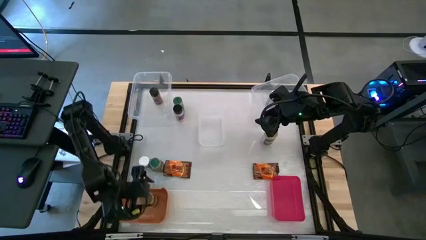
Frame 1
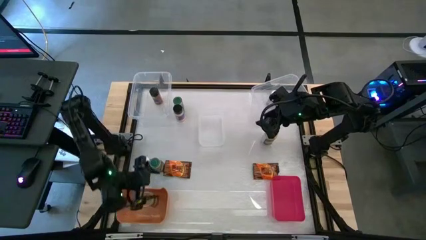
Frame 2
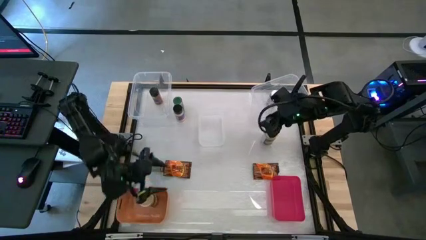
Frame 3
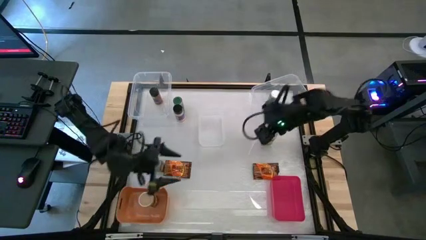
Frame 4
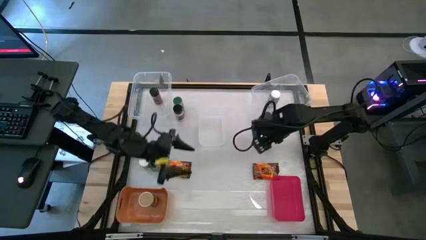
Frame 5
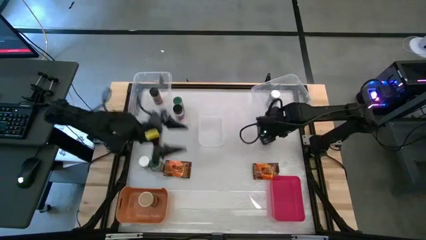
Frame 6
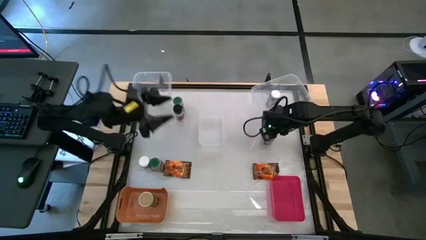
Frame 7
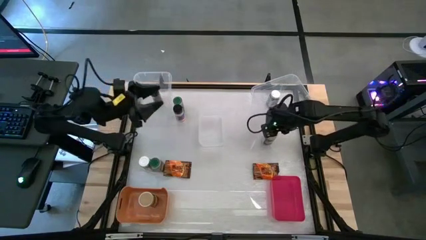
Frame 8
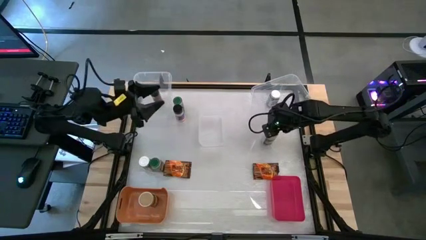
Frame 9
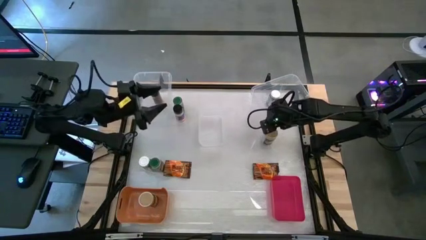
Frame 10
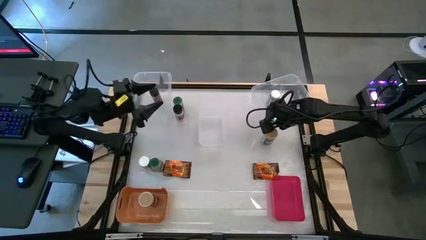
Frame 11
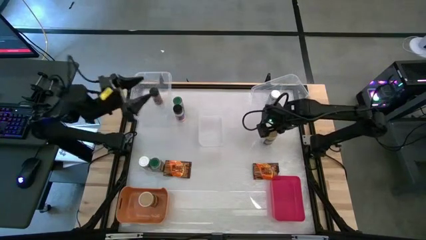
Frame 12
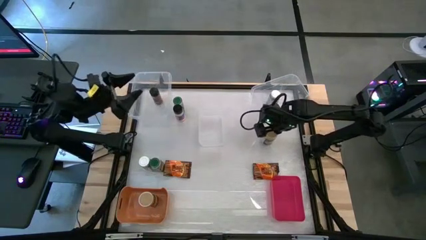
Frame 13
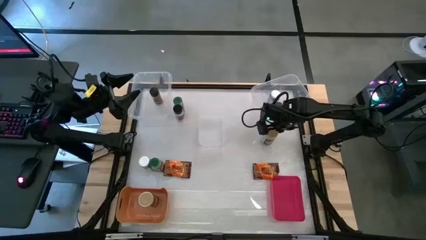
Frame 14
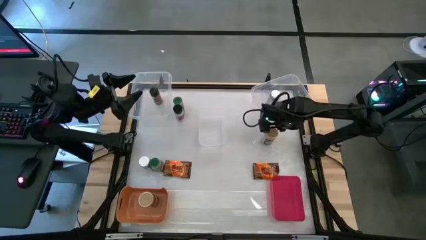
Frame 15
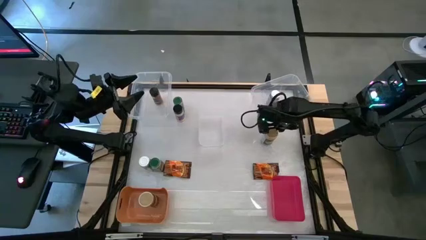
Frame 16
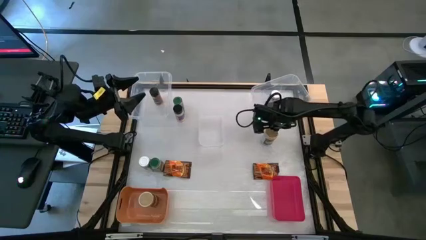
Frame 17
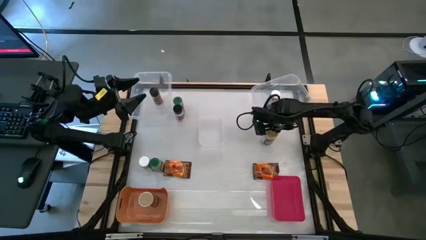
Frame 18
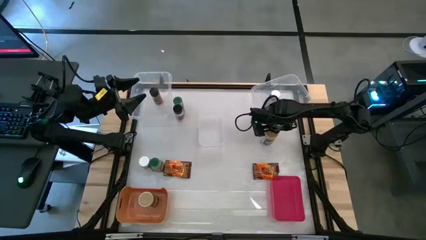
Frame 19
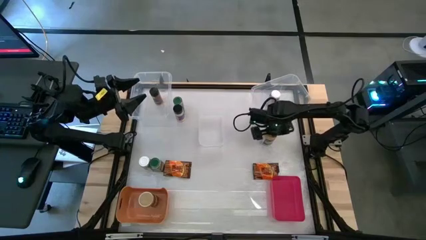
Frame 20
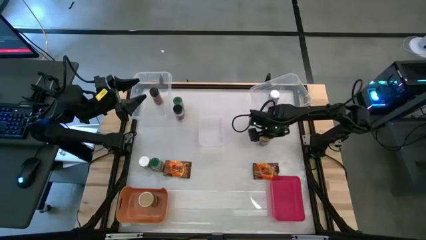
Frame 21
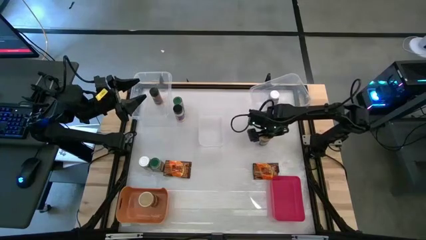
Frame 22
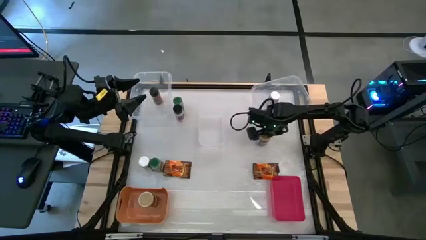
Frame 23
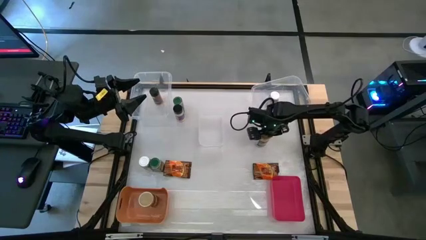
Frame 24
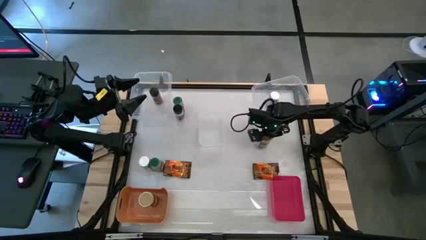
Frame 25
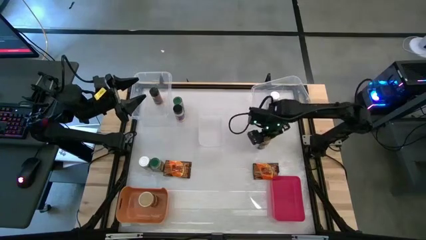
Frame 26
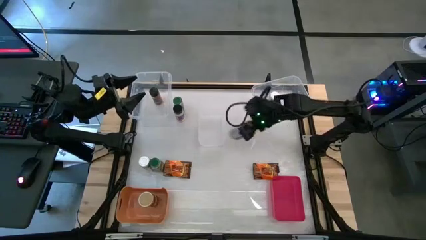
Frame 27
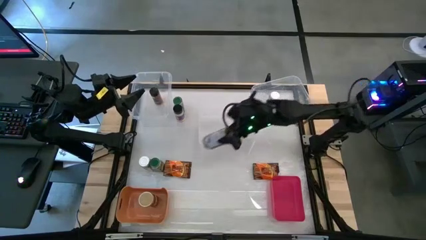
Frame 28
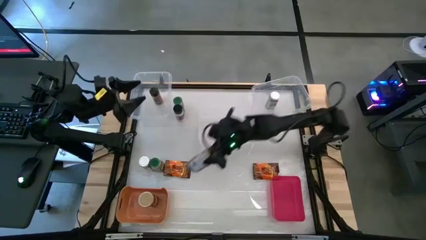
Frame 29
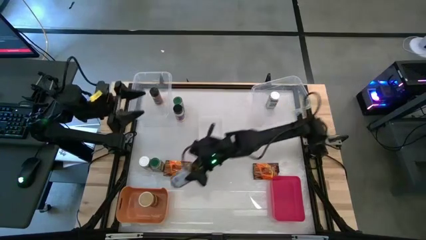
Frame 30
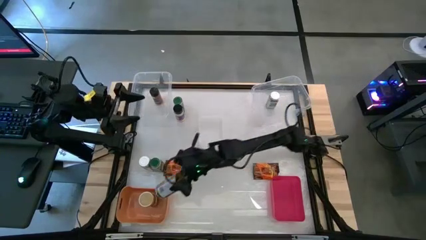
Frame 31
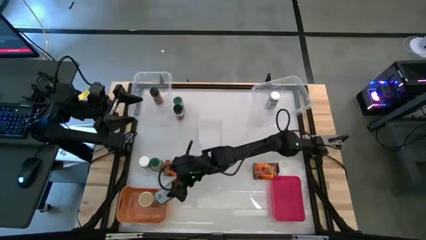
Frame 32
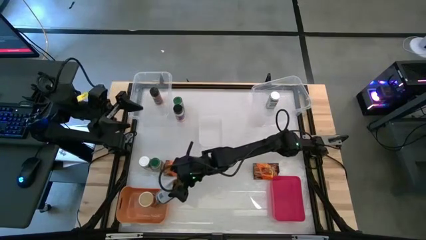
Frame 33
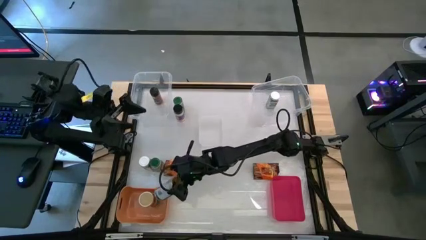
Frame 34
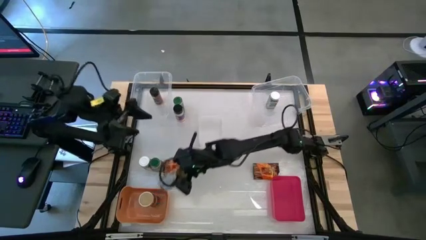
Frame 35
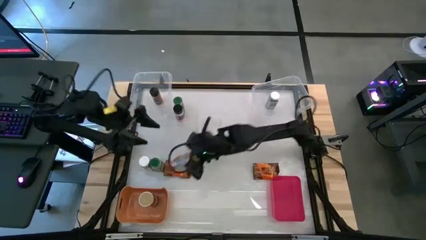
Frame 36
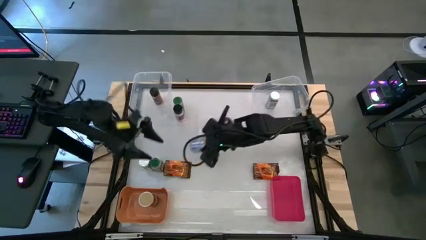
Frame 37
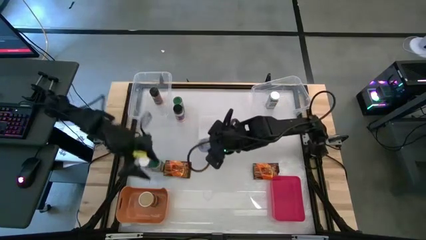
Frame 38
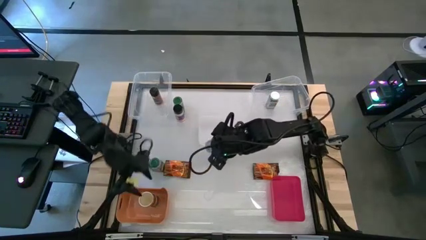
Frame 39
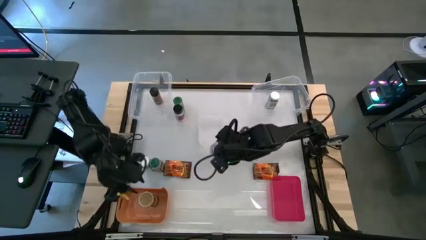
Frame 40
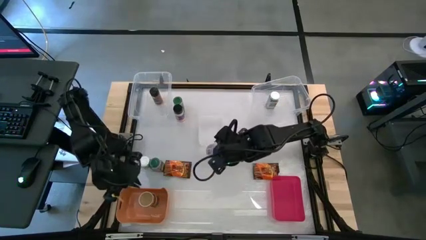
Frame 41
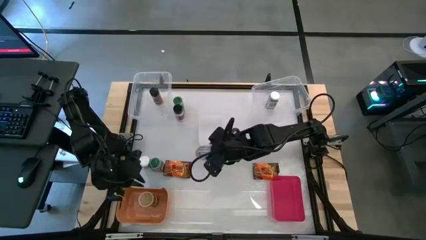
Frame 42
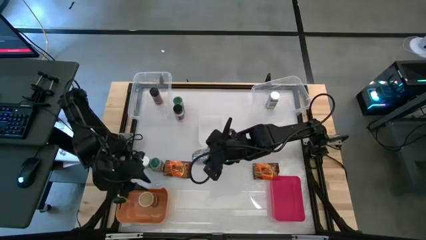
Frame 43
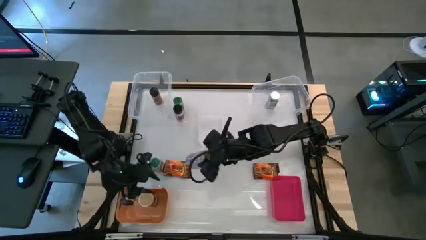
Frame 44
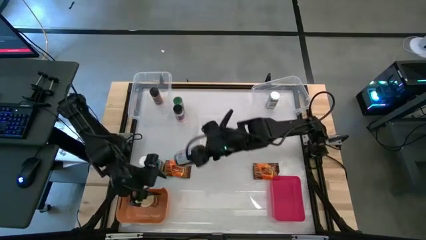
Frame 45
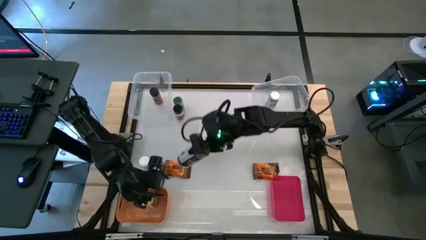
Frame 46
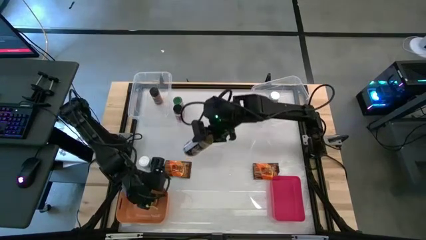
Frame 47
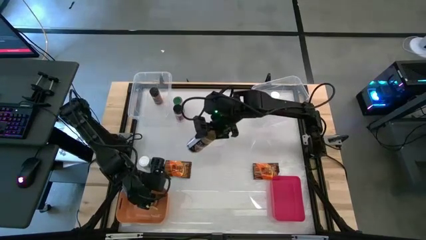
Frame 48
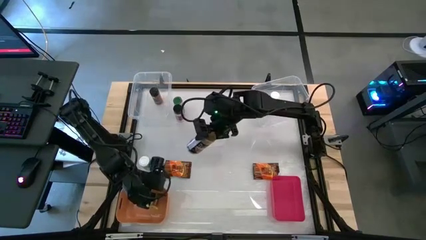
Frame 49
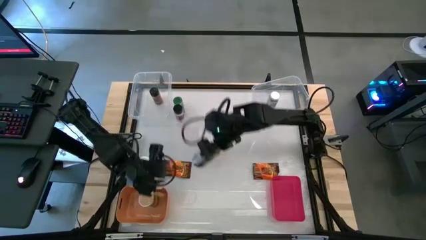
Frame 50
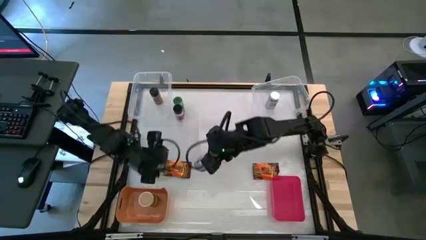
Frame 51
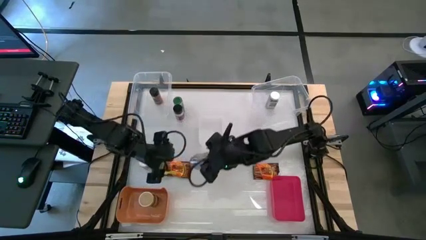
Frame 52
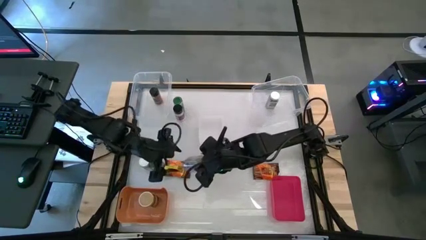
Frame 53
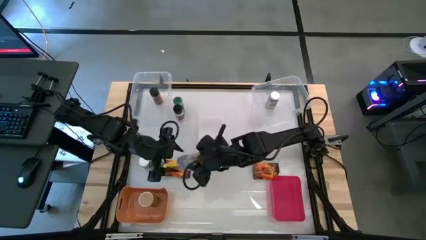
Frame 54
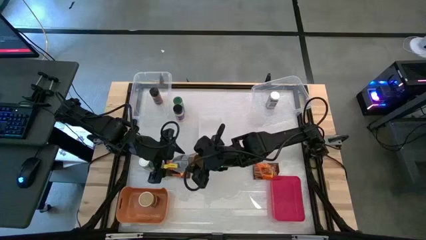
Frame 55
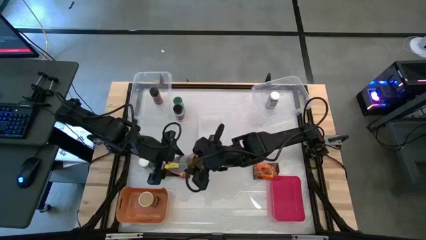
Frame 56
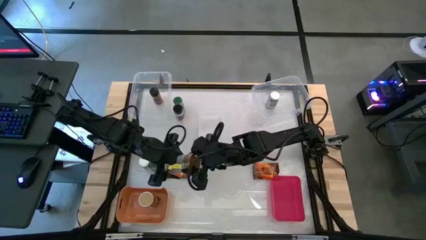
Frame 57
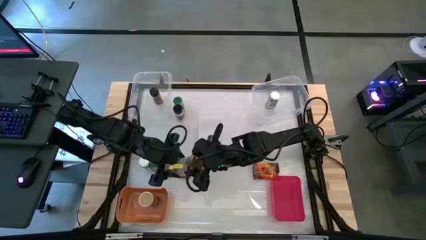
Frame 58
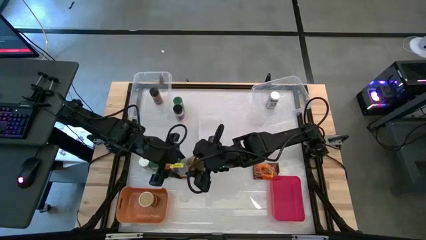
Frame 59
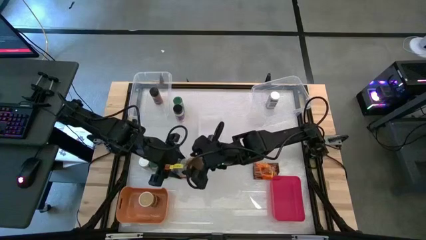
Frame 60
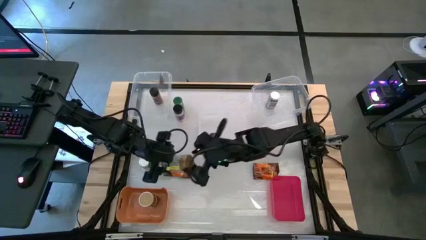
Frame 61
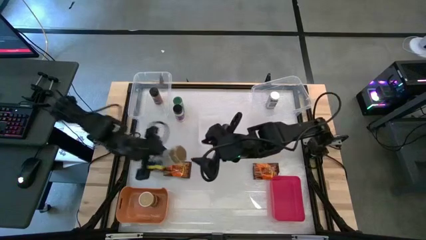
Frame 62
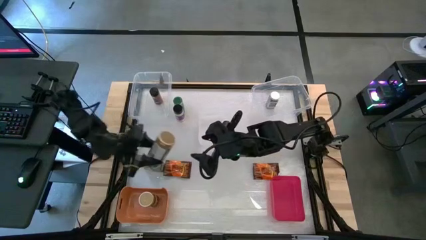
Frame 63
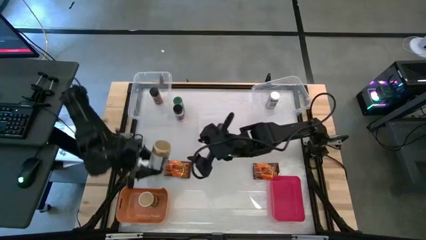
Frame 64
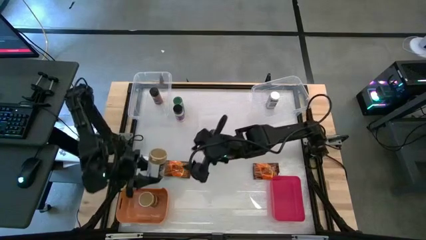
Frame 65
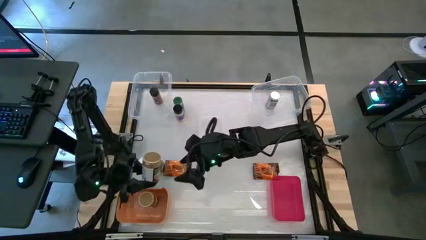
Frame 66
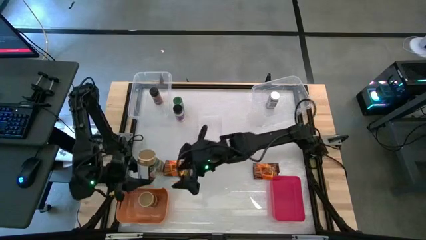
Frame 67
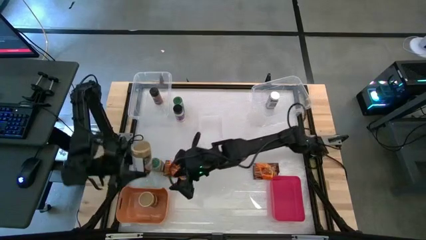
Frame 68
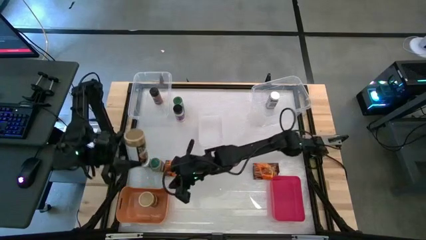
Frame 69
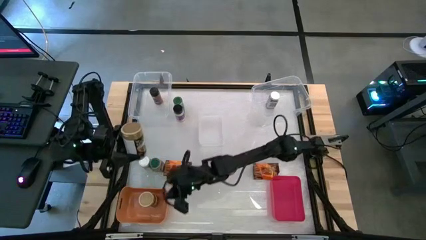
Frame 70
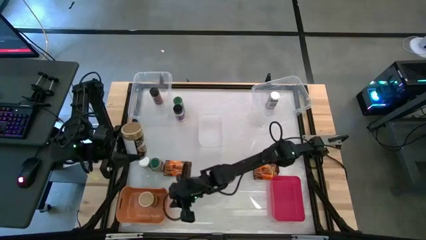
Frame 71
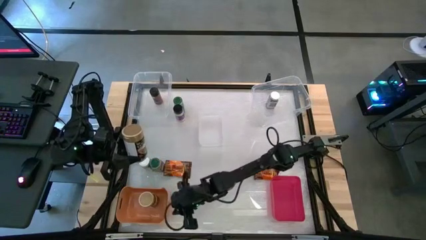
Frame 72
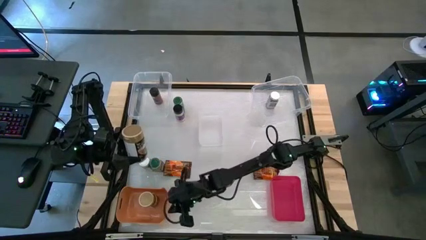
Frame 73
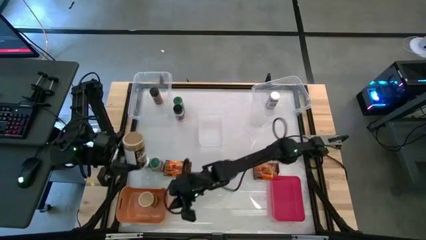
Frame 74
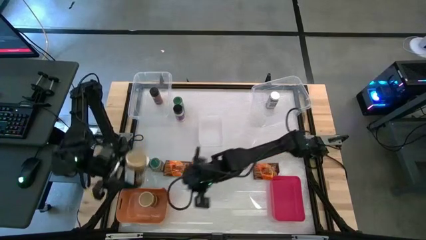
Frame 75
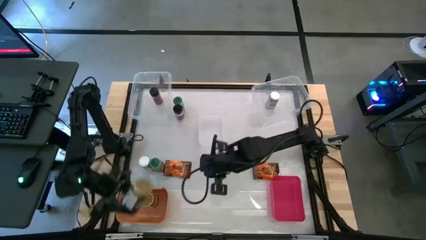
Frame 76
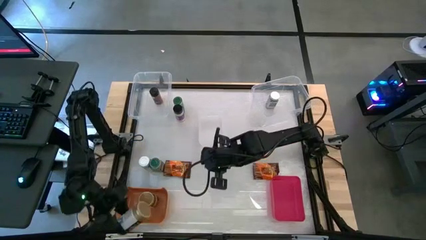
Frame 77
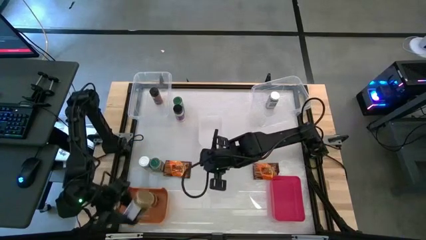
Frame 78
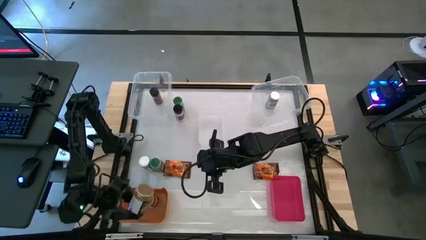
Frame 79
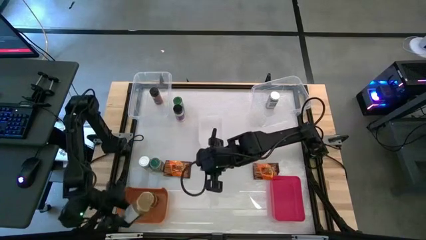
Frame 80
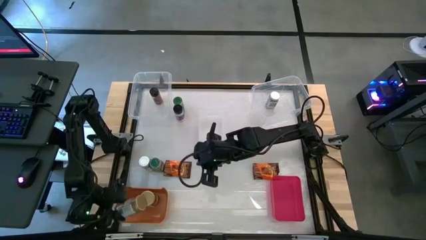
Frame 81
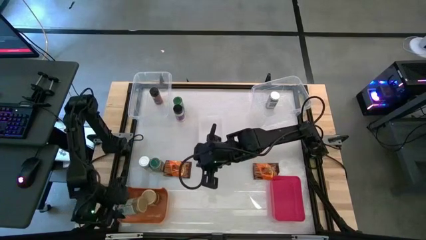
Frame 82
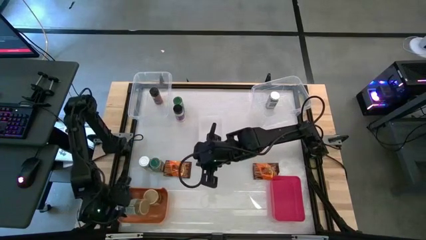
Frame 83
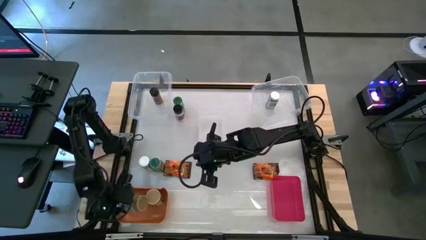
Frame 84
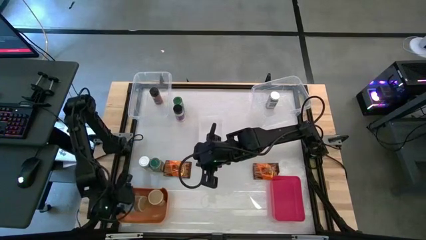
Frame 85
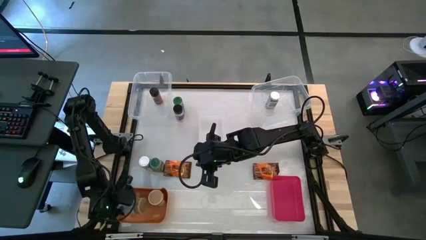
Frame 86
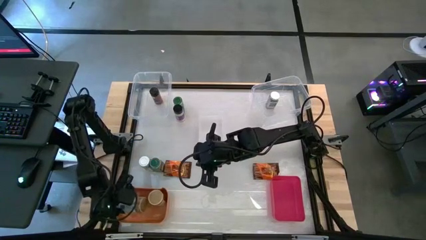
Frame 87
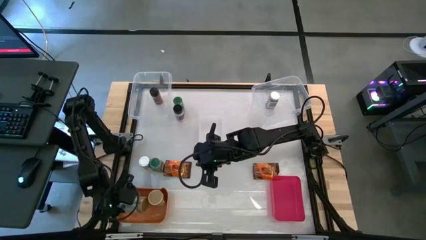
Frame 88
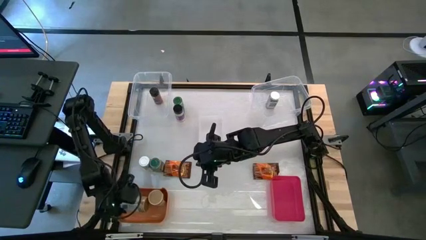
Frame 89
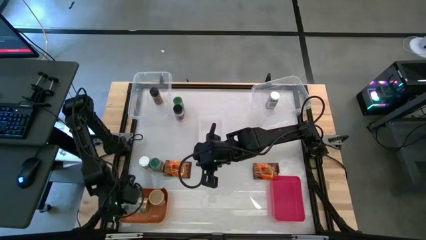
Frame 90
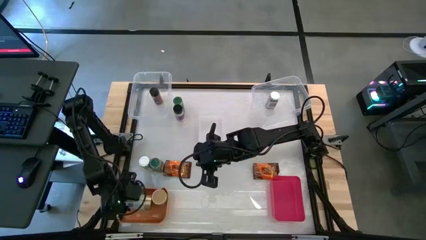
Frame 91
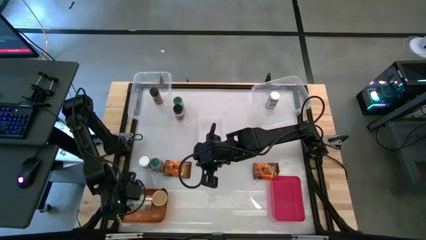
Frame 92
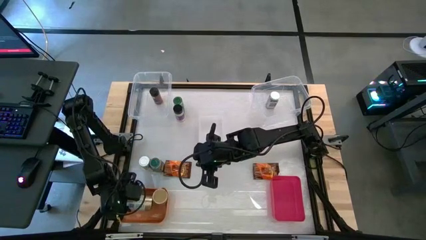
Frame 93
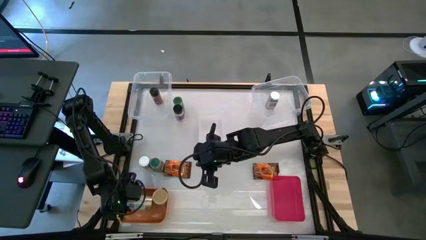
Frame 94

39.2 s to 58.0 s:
Task: Sort spices by type
Put the gold seasoning bottle into the orange bin
